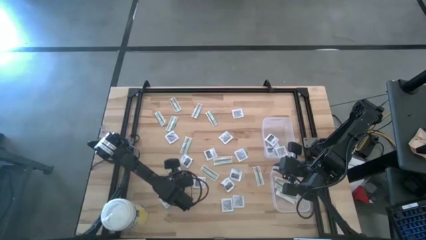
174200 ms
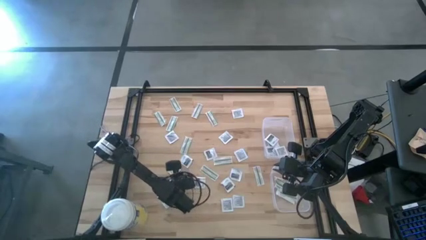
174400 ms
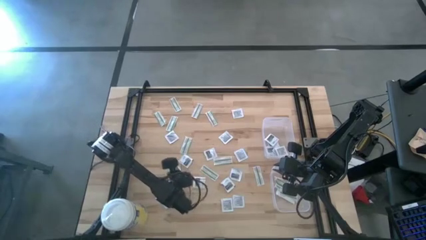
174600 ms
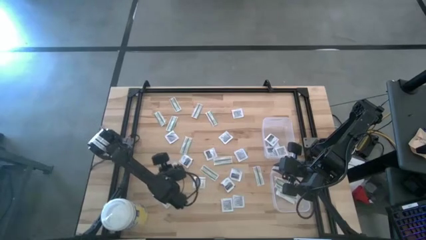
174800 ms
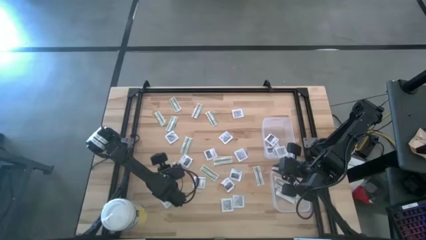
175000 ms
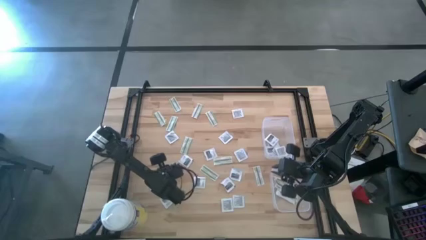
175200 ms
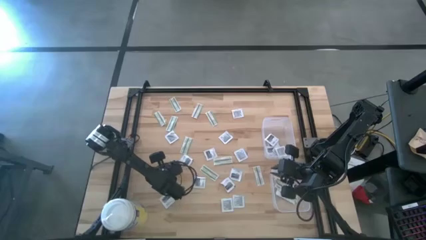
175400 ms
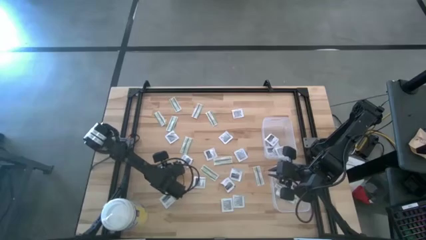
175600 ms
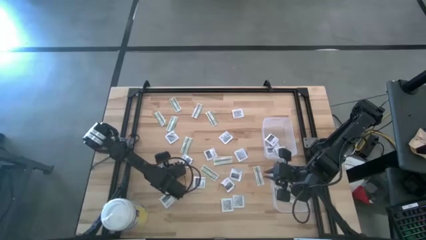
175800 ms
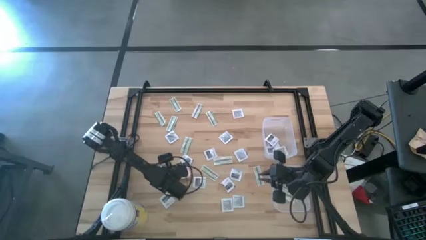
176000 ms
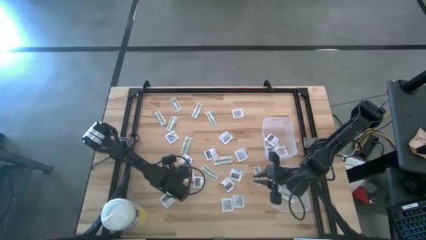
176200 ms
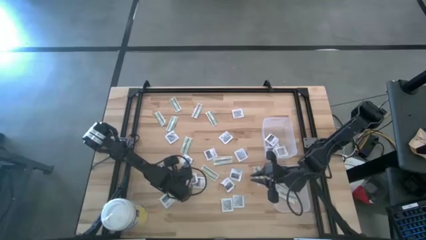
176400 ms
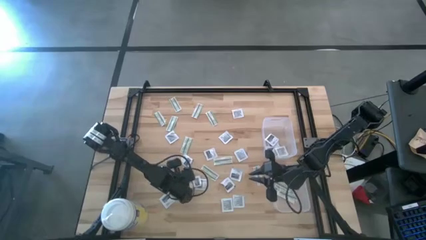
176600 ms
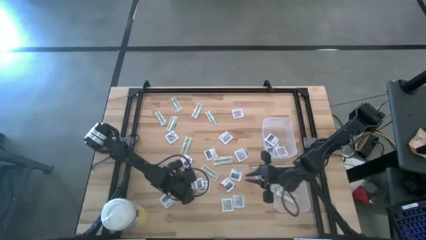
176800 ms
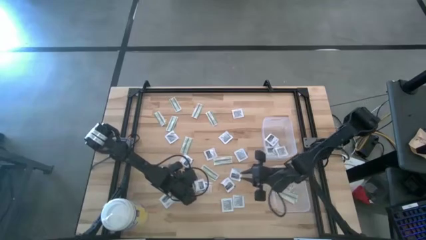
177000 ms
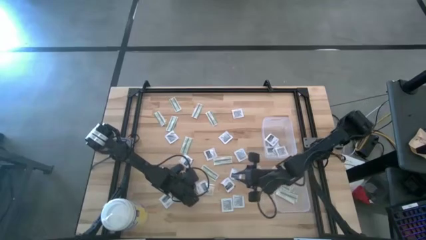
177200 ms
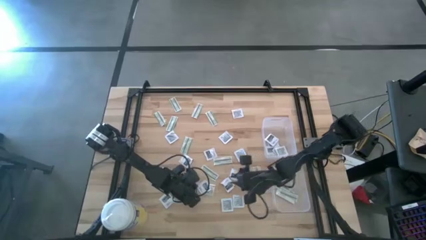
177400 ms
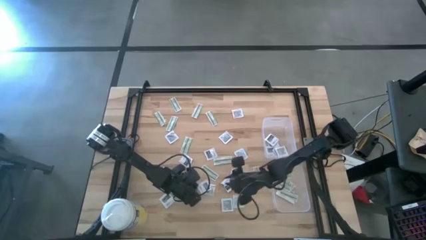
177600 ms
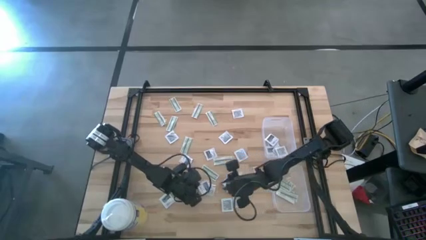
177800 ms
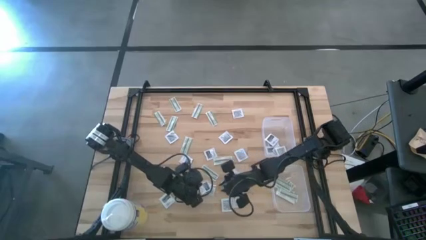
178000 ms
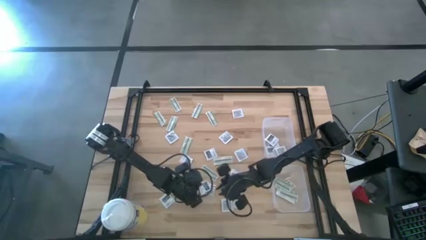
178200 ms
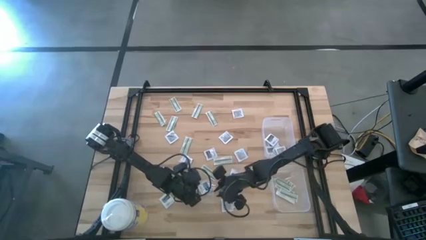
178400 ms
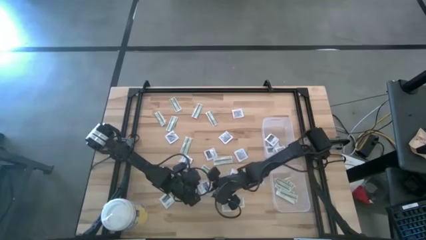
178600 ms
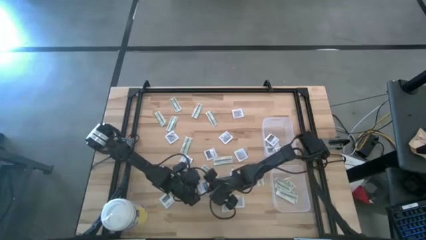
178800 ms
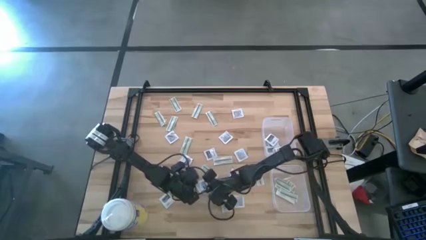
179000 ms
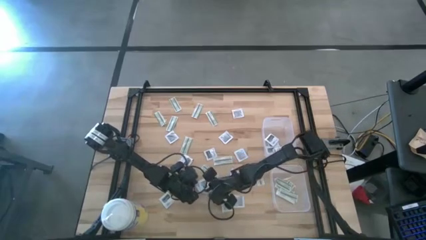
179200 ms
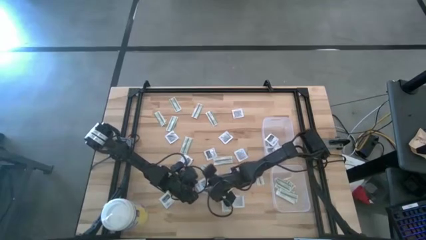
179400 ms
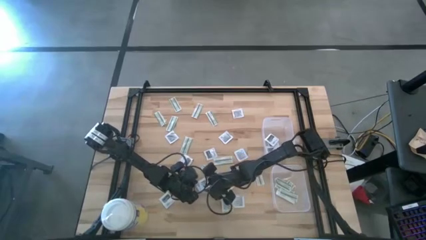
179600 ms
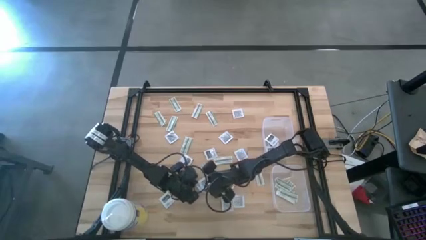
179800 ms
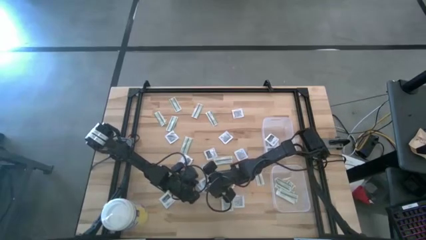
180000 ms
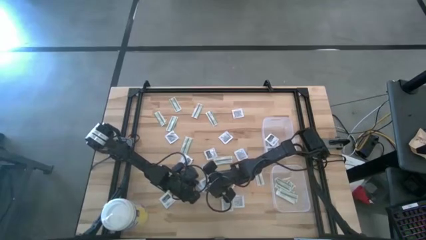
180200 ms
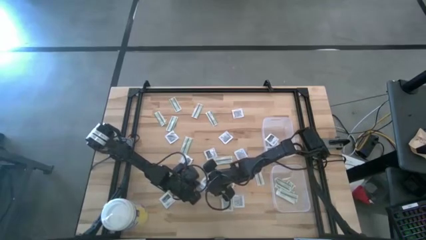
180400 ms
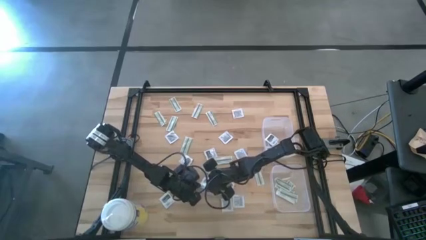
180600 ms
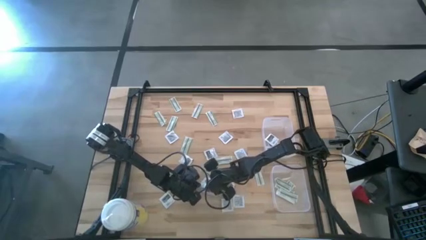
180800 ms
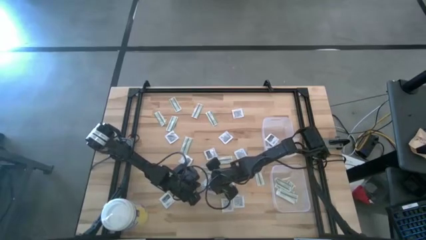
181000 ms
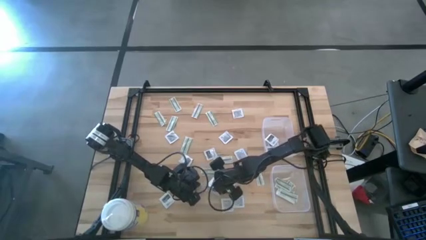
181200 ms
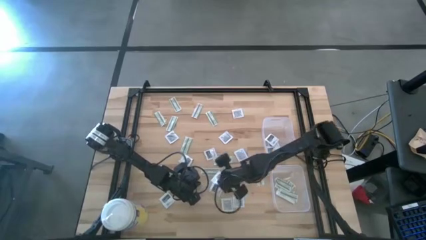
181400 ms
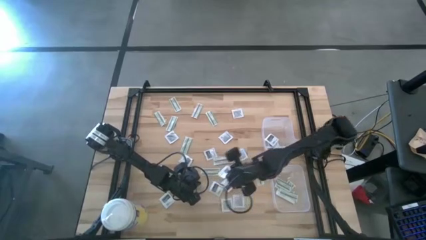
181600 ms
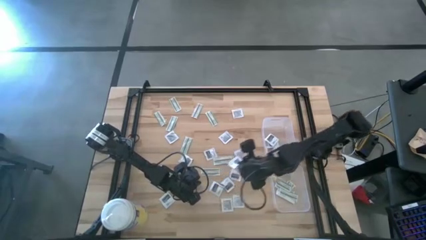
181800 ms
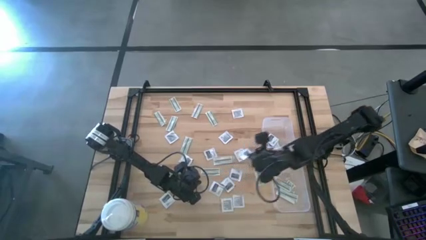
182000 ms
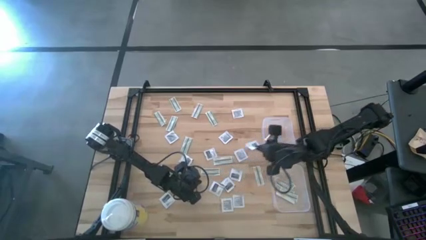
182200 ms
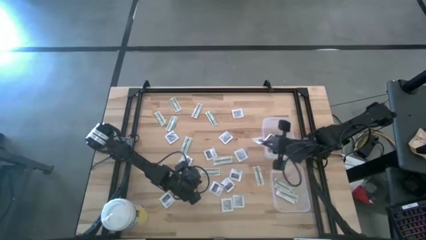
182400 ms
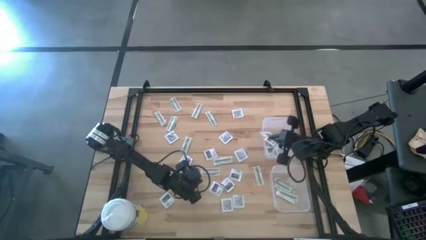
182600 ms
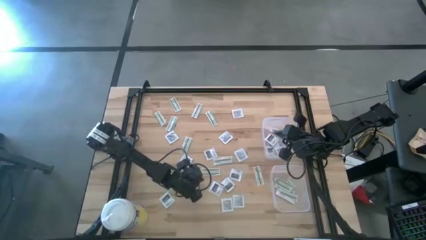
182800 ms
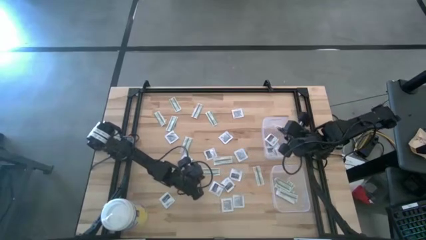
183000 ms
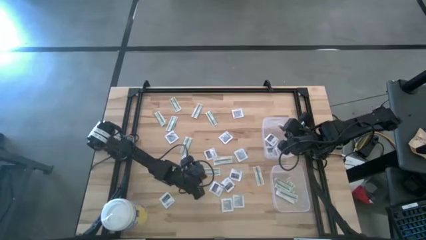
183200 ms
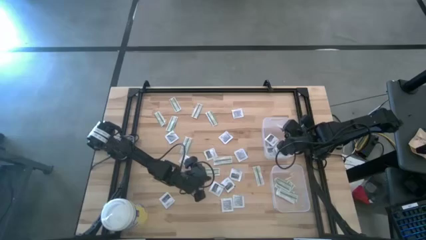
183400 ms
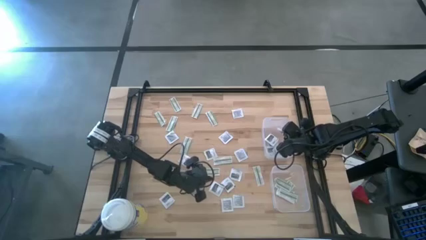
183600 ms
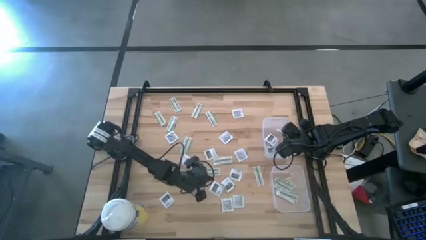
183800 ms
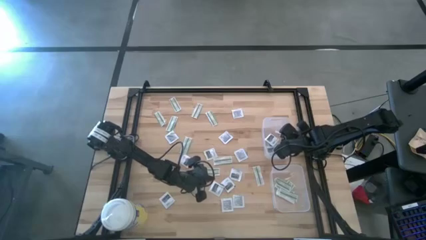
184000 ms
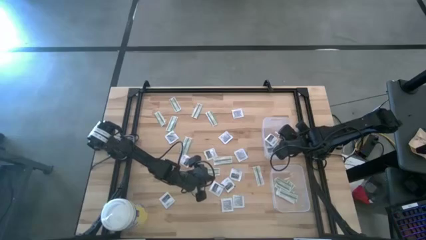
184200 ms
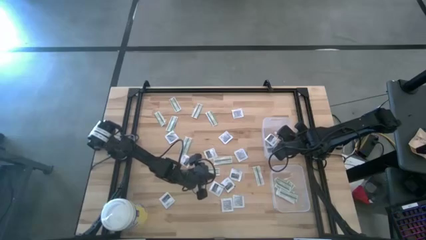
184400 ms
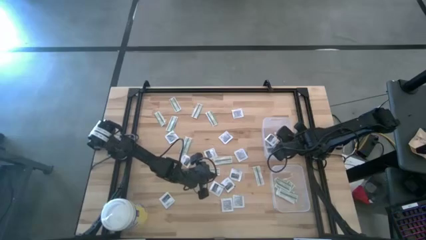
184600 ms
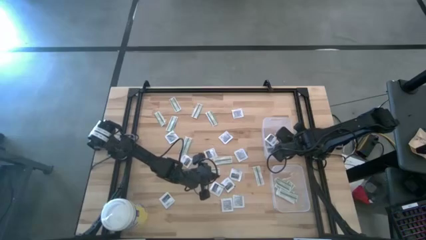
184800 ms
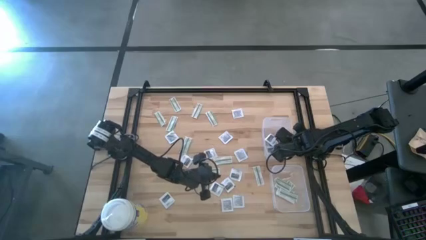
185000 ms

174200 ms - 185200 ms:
Task: Pick & Place First Aid Supplies
Put the towelette pack into the top bin

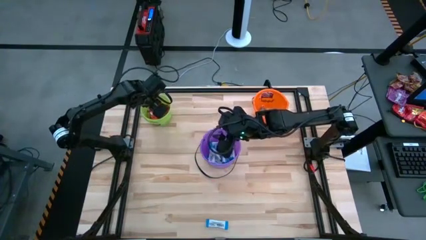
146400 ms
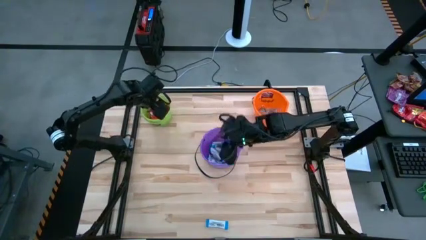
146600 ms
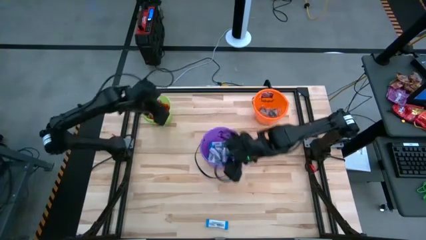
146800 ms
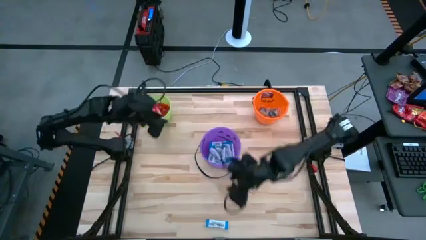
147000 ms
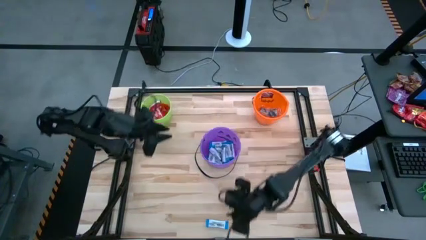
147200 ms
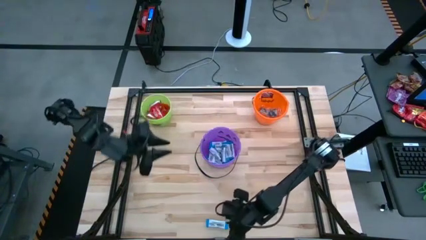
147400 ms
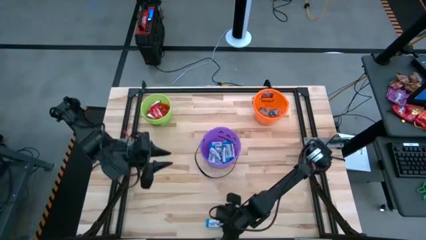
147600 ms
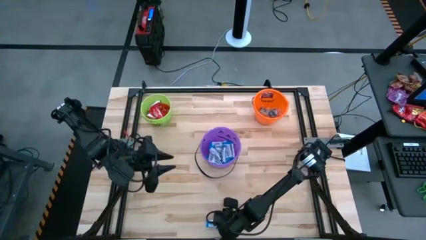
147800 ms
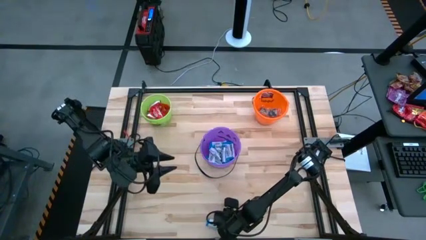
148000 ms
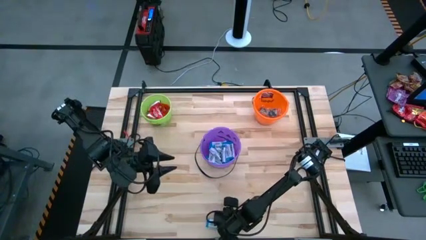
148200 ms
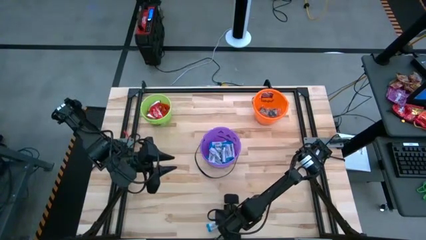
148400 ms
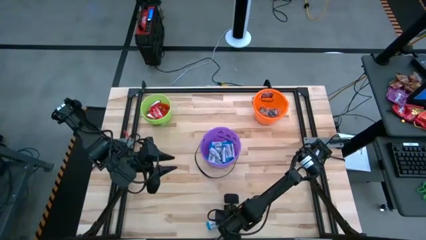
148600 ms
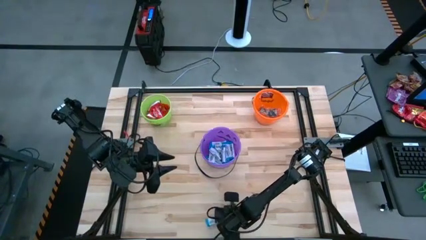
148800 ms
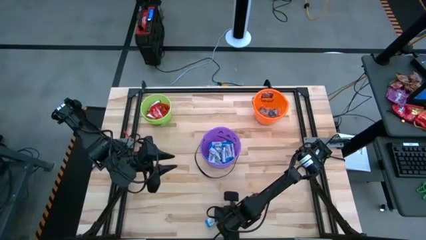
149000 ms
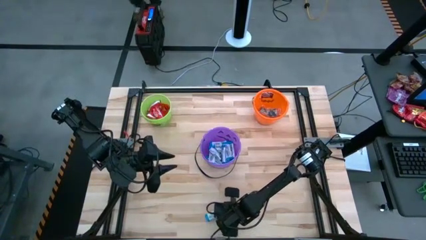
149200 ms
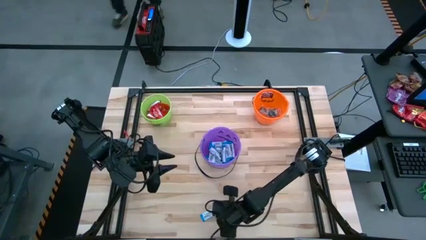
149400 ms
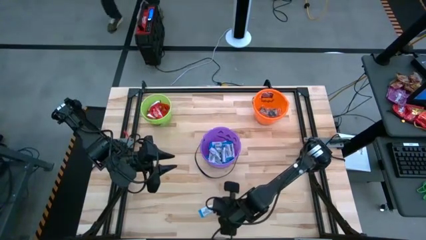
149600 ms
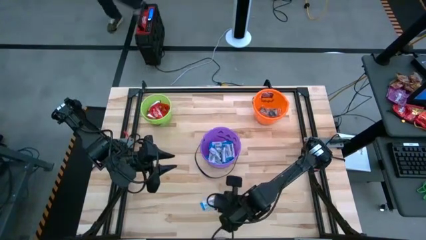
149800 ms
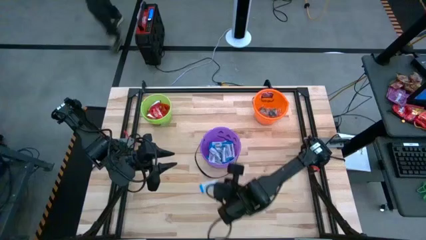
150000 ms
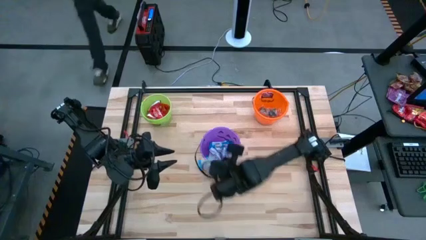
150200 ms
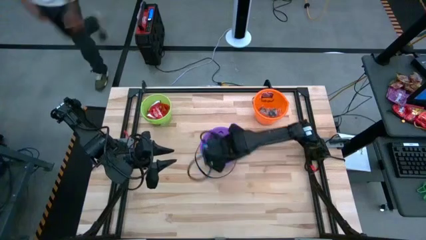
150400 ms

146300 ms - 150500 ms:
Task: Sort candy by brand, put in halloween buckets
Put the white chocolate into the purple bucket
